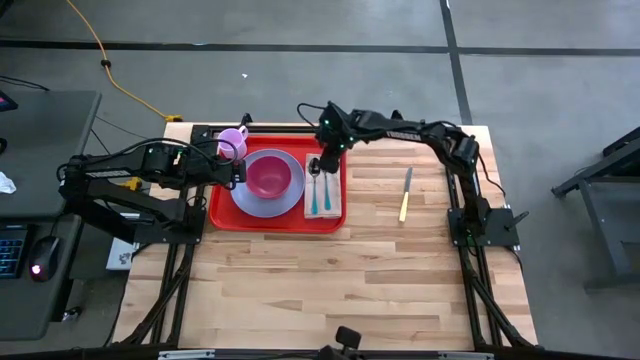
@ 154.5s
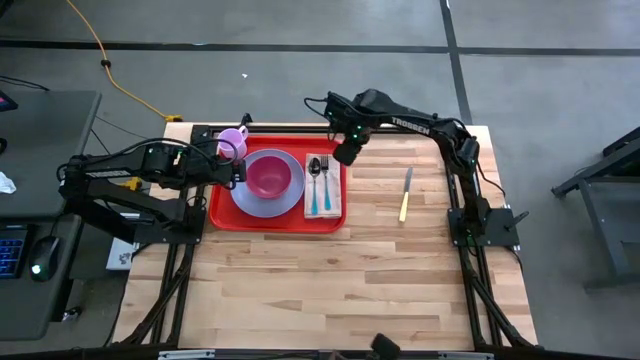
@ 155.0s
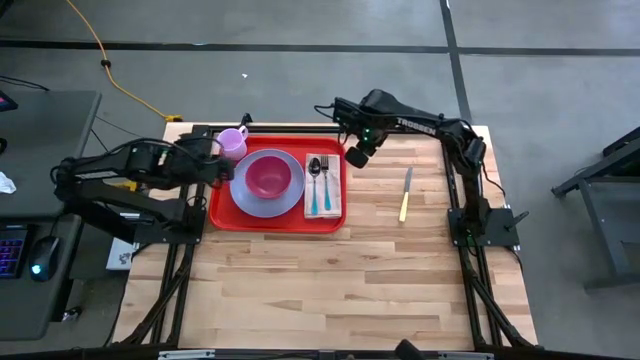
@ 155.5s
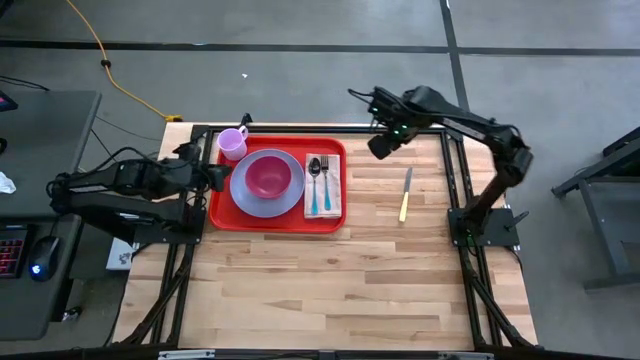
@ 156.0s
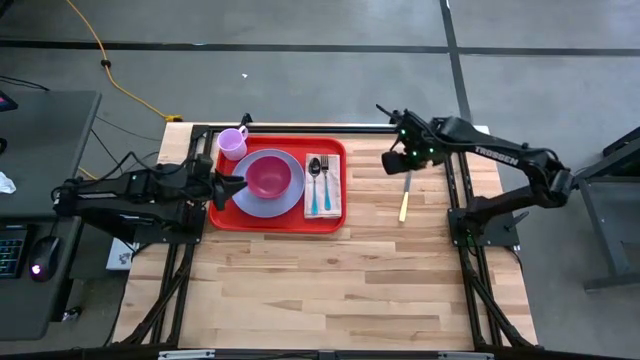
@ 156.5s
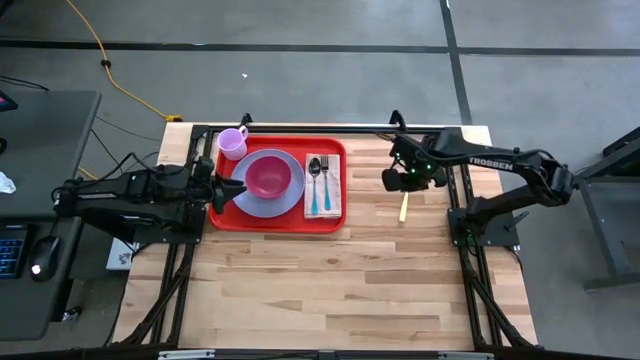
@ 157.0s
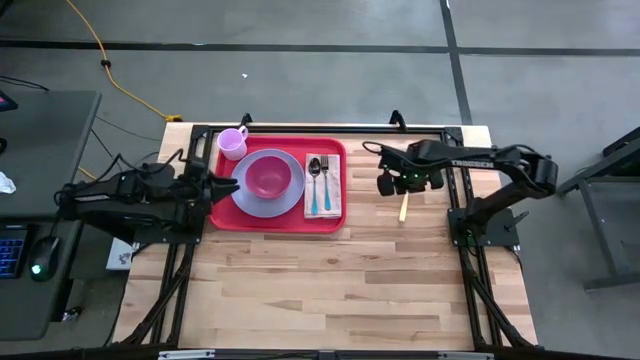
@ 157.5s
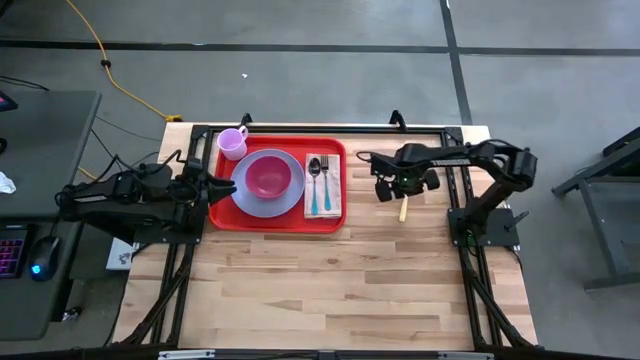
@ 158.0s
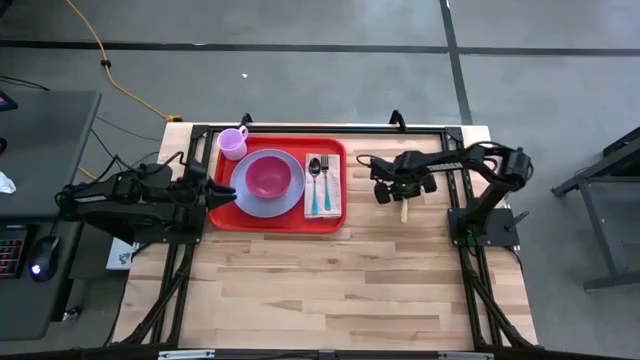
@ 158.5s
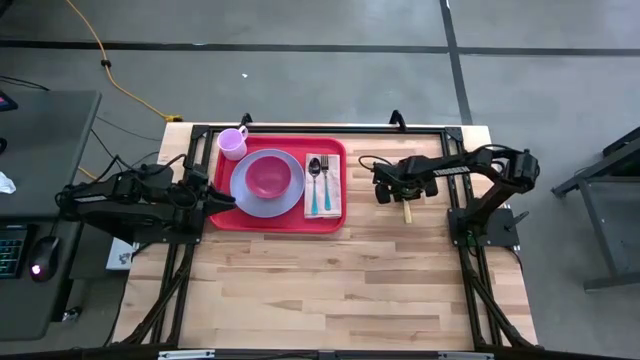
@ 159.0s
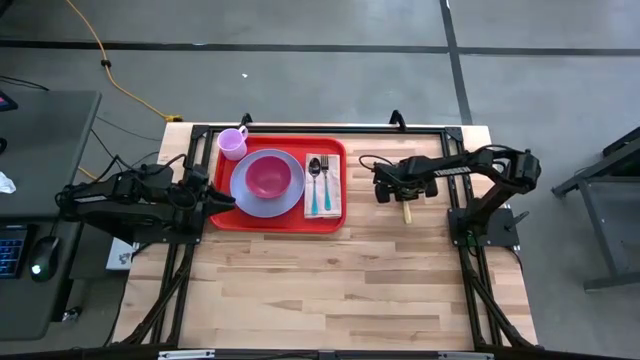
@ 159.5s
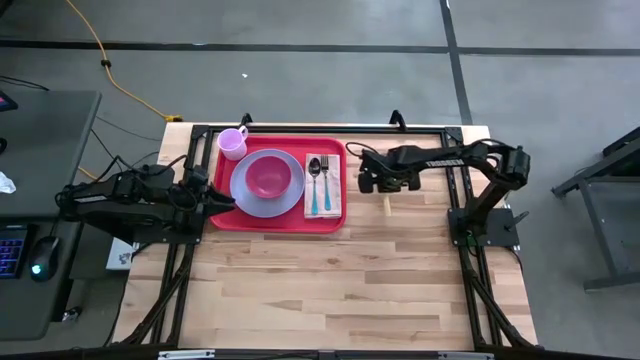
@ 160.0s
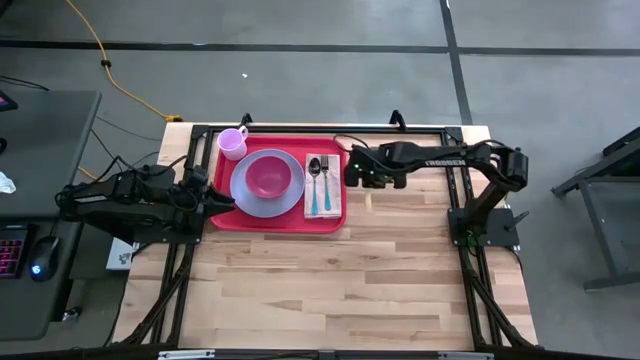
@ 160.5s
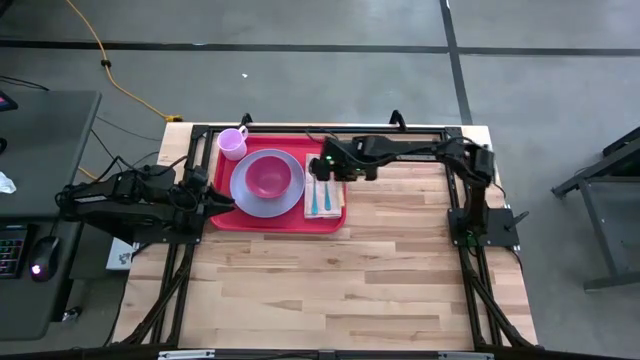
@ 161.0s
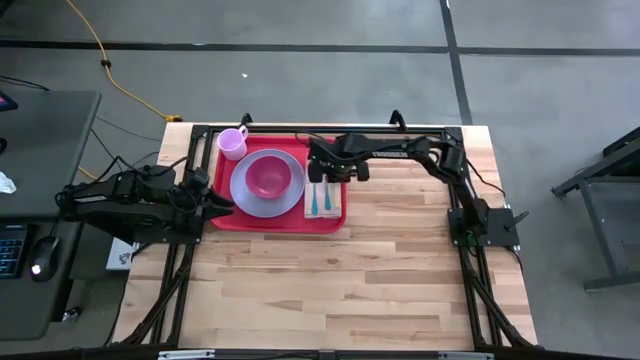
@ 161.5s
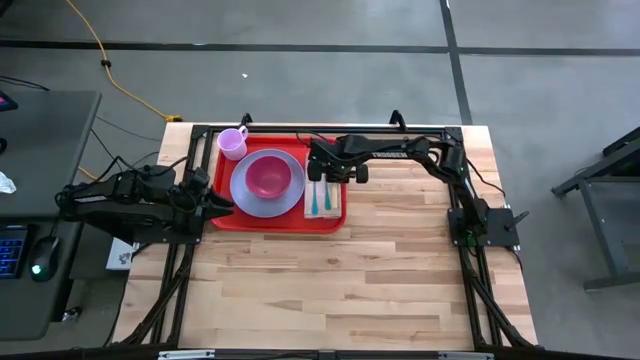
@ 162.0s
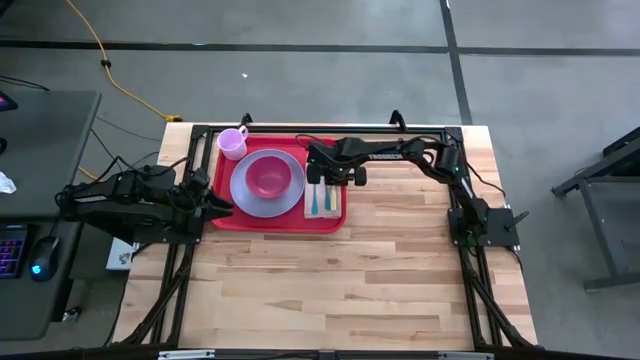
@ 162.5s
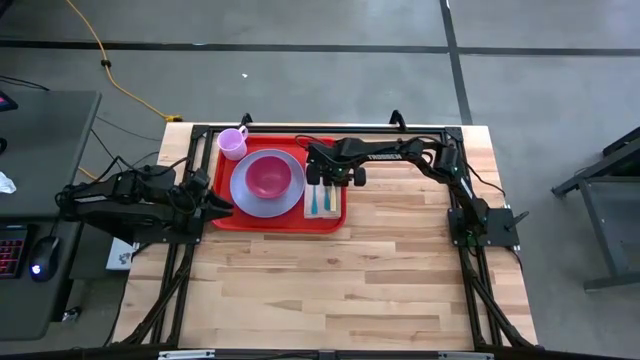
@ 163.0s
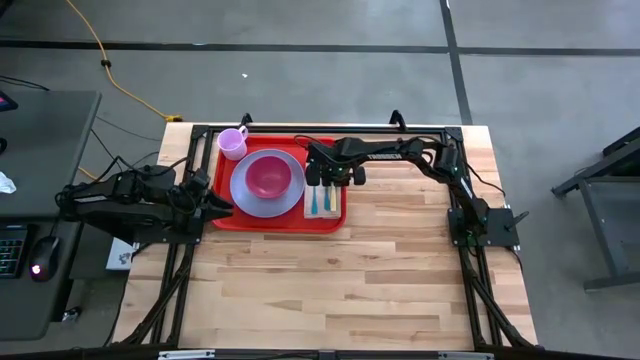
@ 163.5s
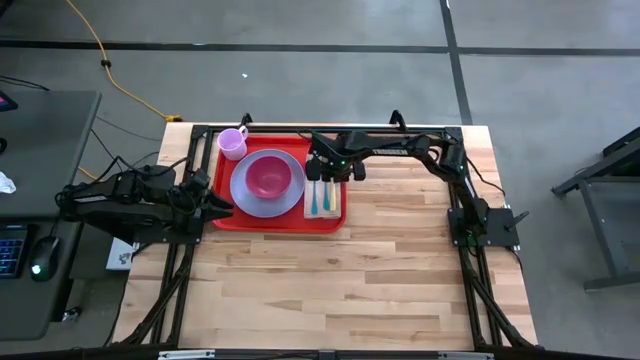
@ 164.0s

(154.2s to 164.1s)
Task: Set up tray
Put the yellow table knife on the white table napkin to the right of the blue fork

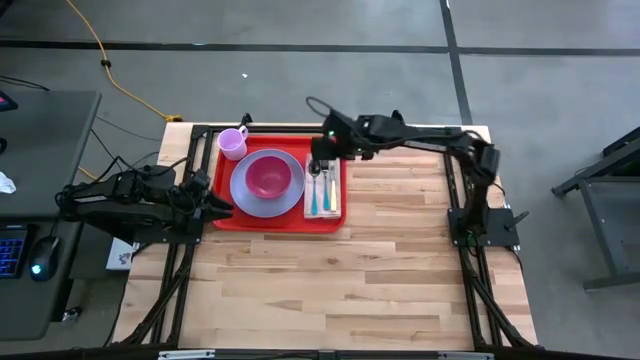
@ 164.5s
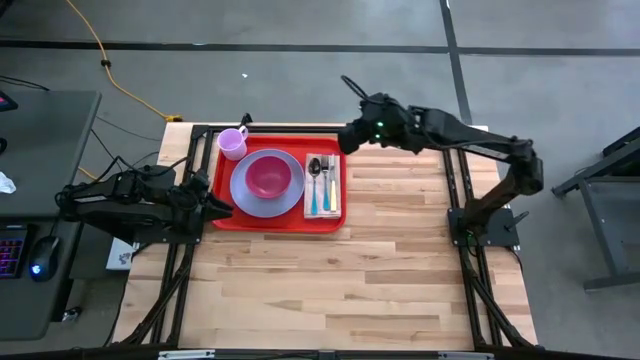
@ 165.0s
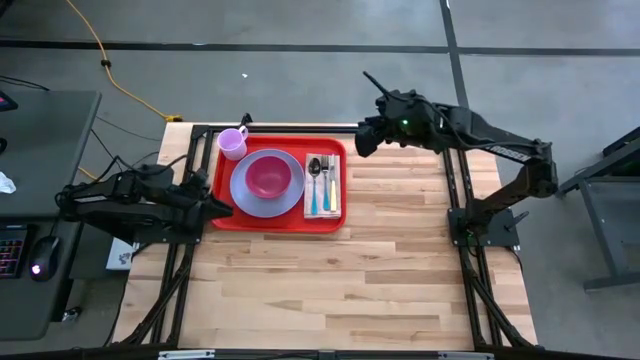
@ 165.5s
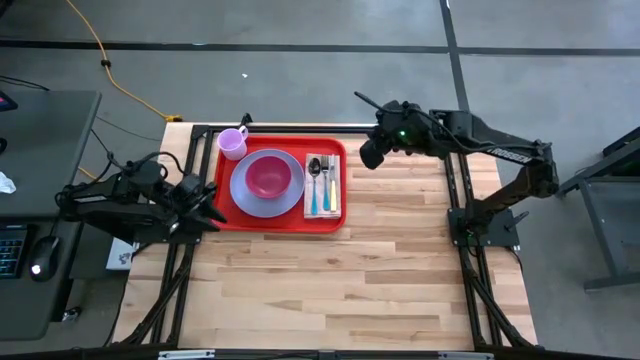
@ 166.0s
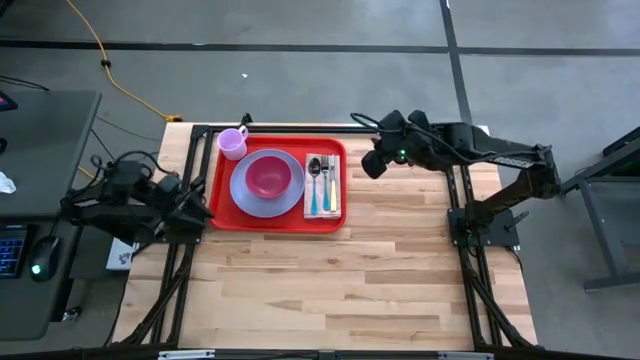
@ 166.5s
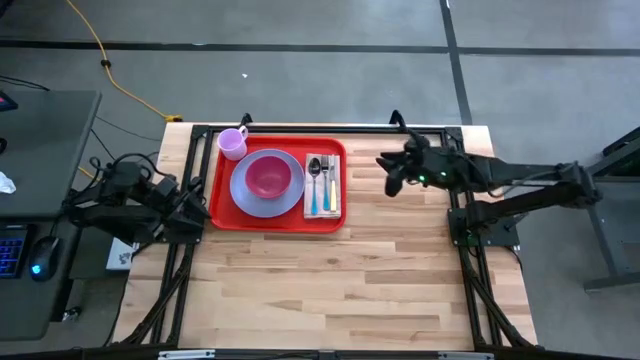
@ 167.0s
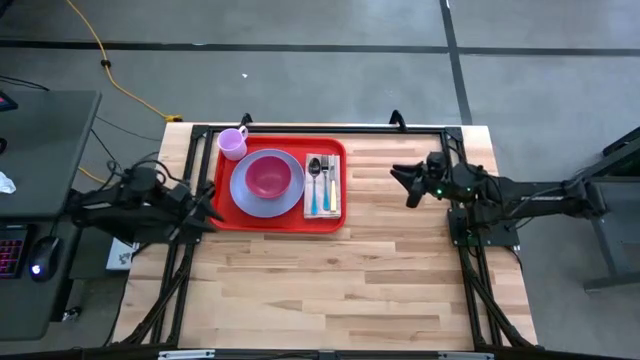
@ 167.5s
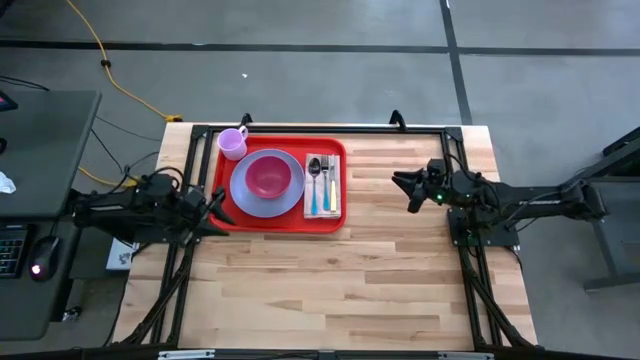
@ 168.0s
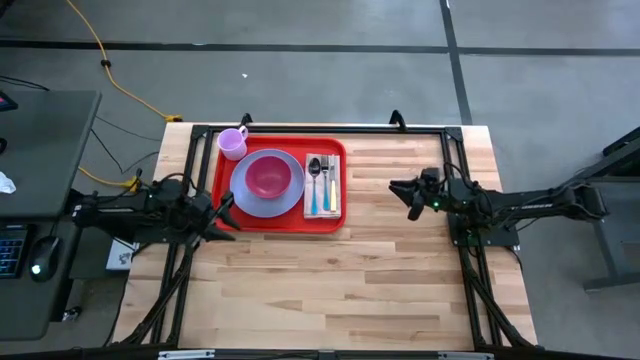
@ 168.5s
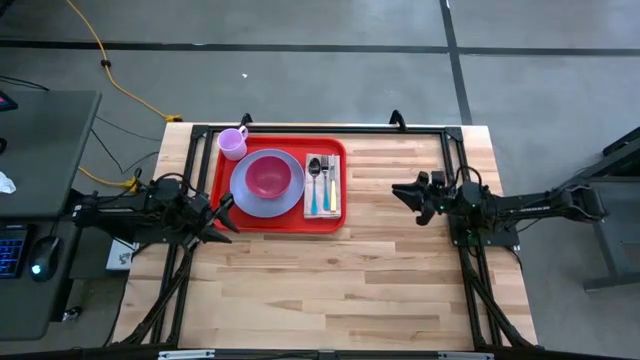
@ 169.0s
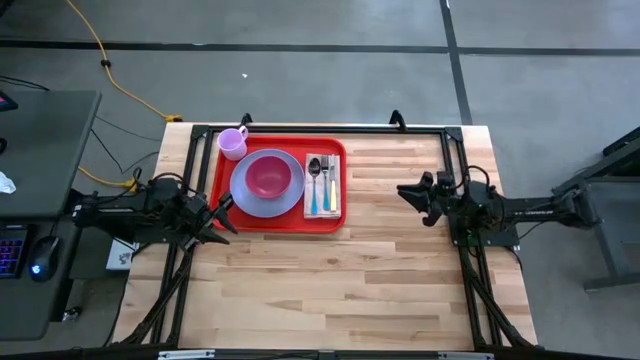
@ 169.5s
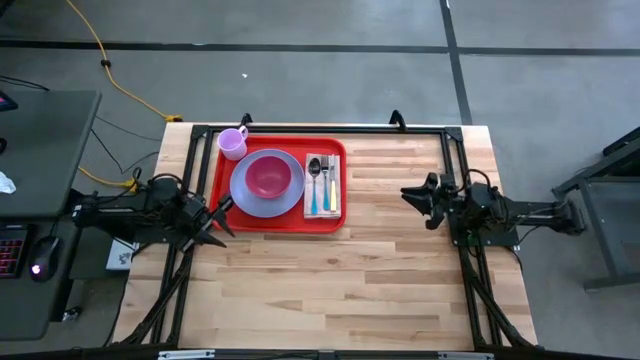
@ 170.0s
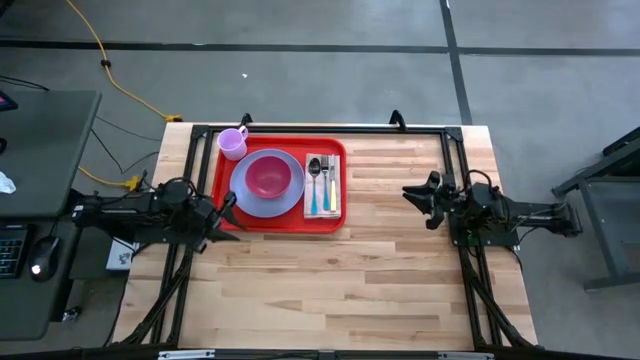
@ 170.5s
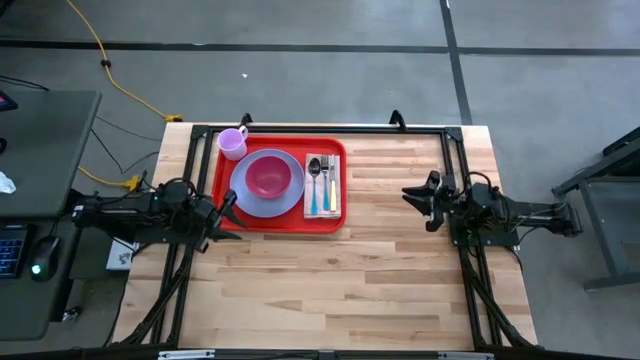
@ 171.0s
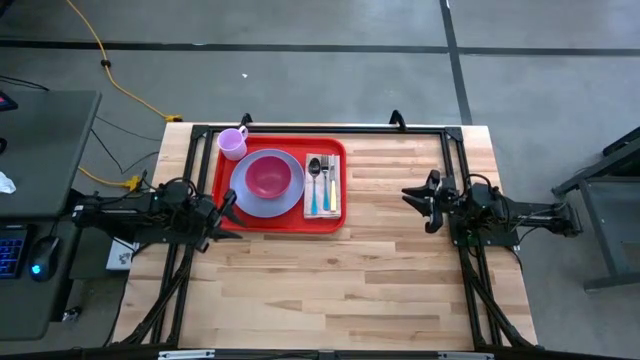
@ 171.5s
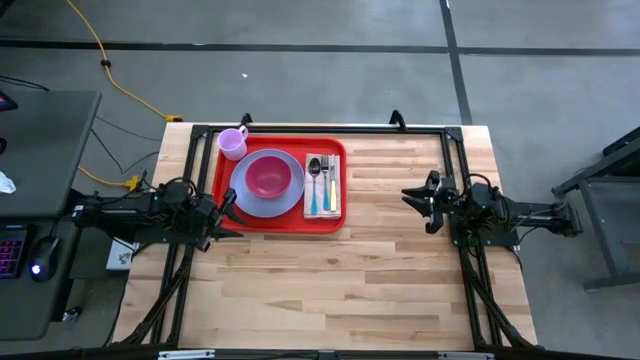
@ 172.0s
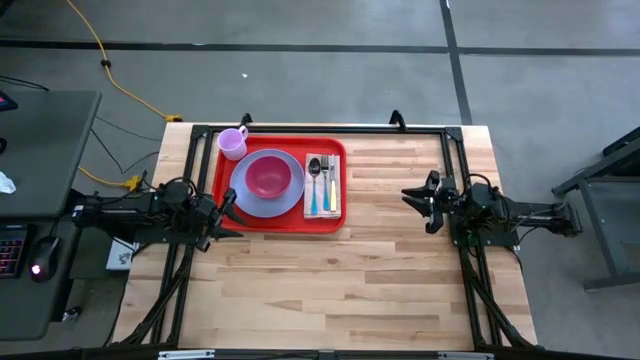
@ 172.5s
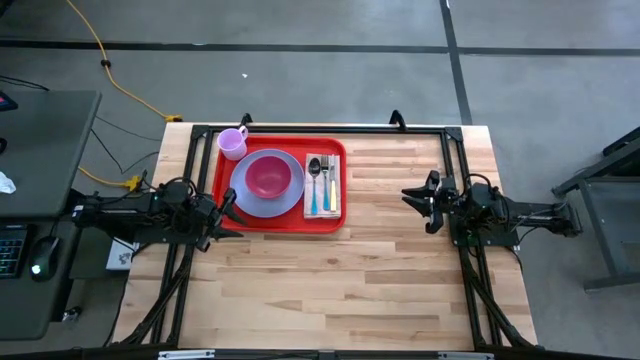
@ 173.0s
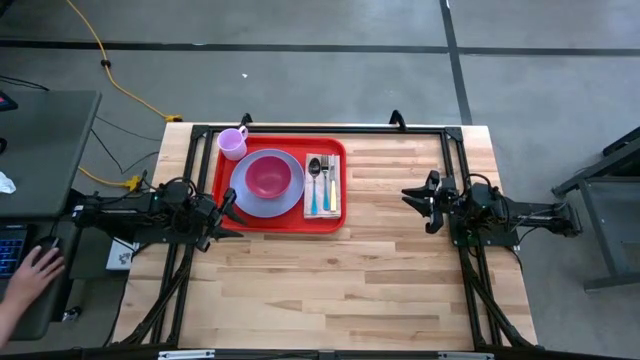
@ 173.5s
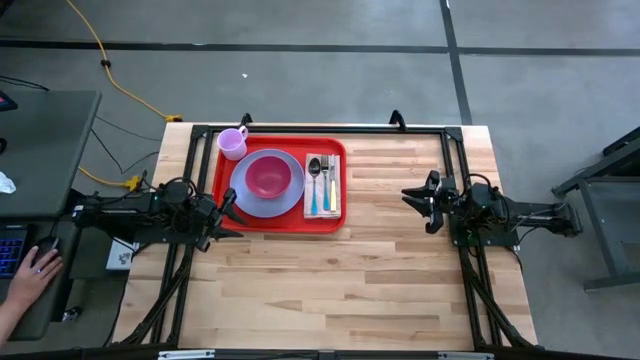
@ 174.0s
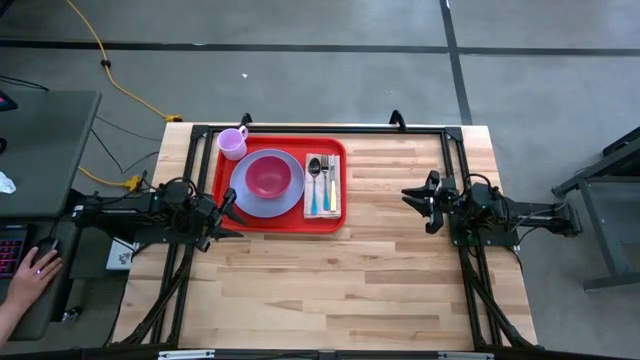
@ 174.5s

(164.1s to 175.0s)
Return to Home Position

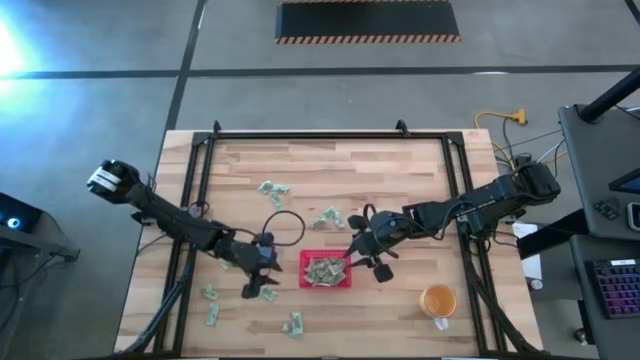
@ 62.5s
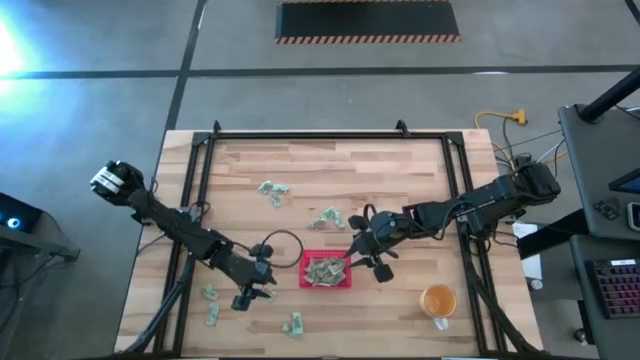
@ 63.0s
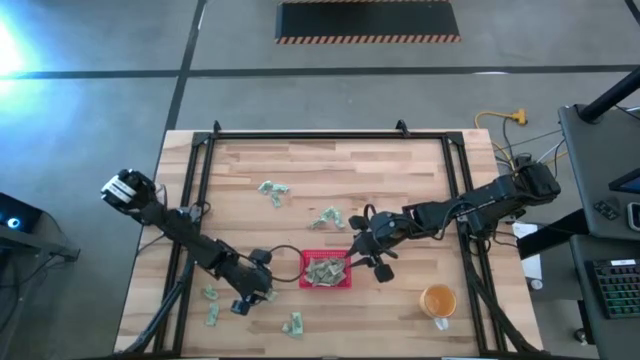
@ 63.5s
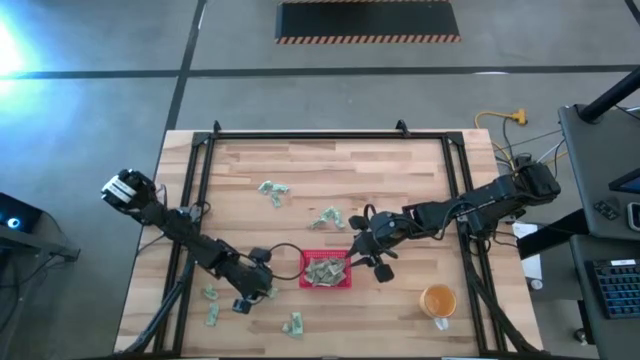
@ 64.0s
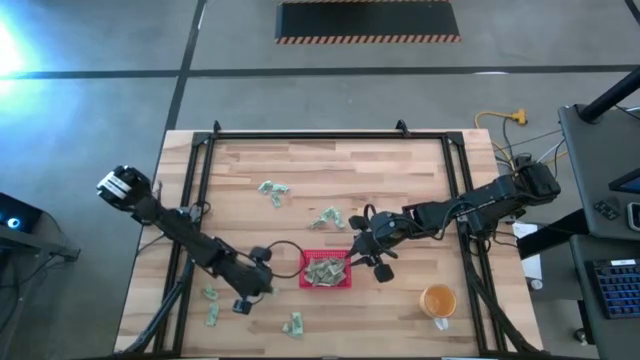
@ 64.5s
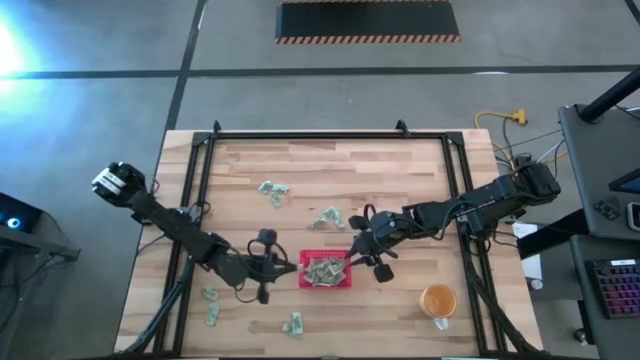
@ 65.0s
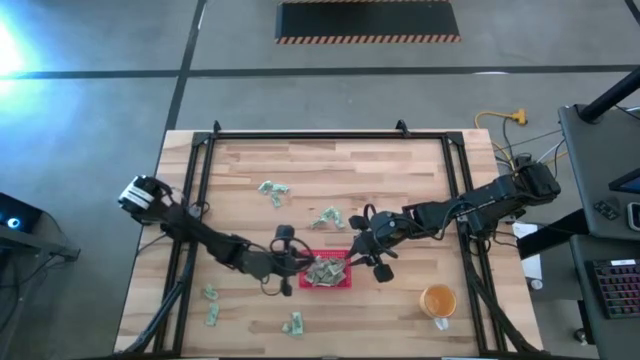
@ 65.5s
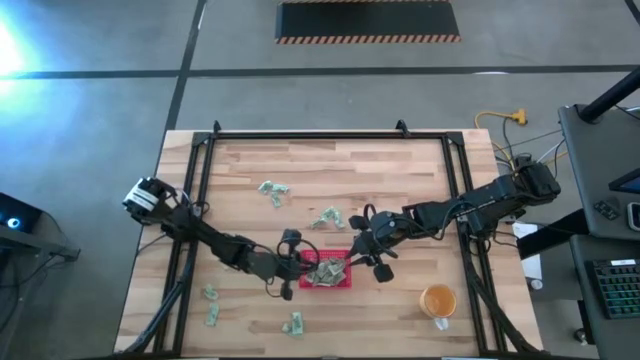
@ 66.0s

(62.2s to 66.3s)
Task: Pick and place Stevia / Truvia into bins
Put the white stevia packet into the red bin
